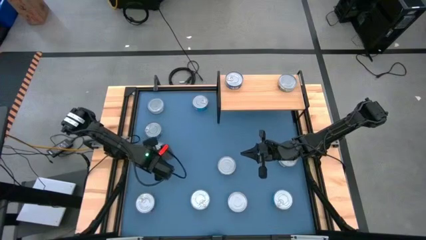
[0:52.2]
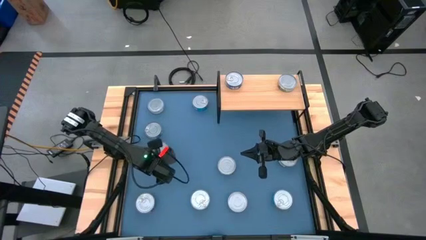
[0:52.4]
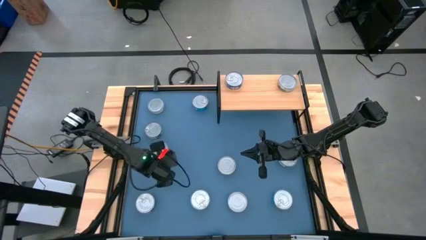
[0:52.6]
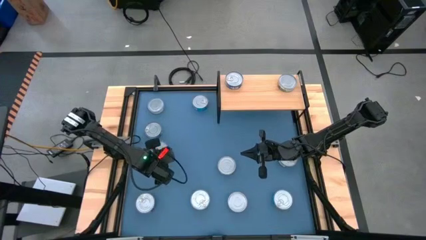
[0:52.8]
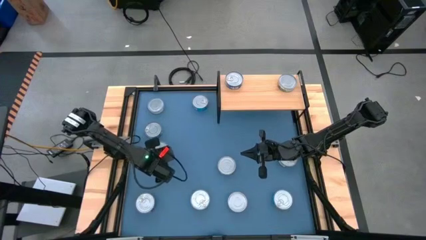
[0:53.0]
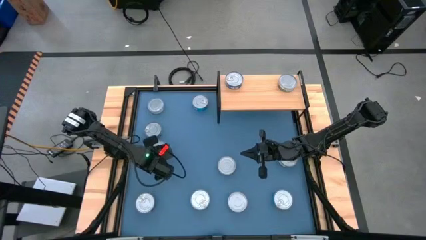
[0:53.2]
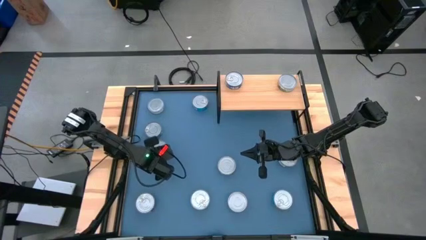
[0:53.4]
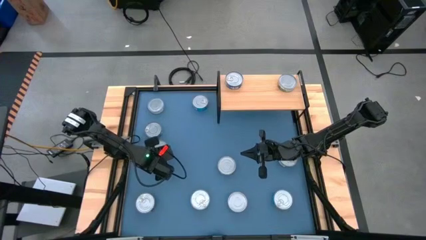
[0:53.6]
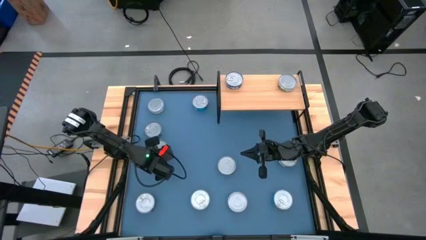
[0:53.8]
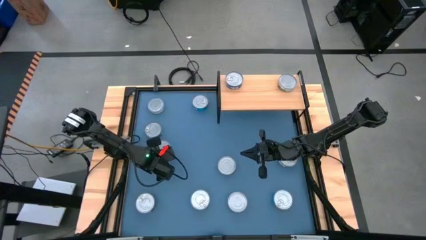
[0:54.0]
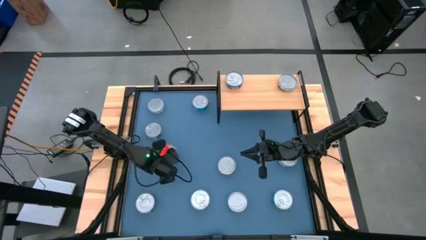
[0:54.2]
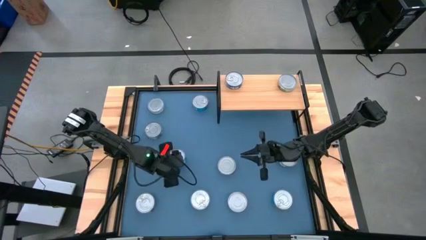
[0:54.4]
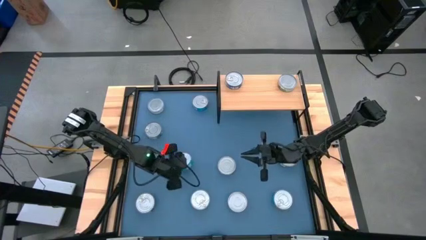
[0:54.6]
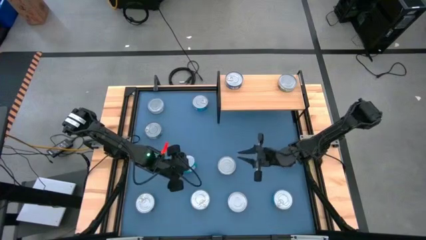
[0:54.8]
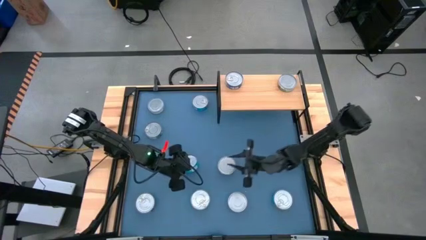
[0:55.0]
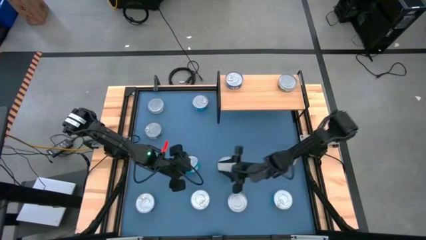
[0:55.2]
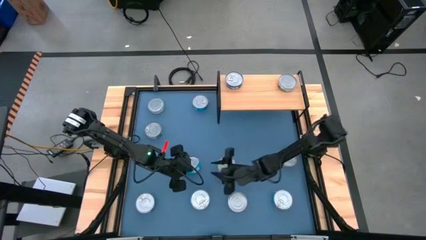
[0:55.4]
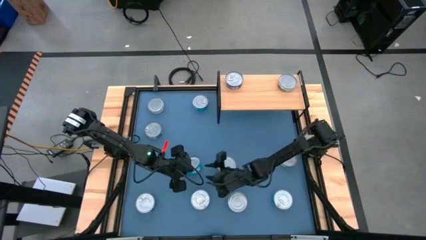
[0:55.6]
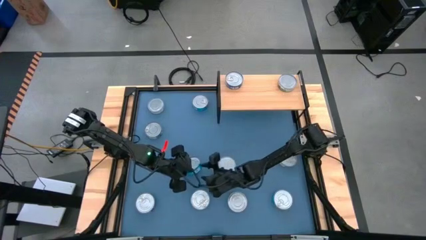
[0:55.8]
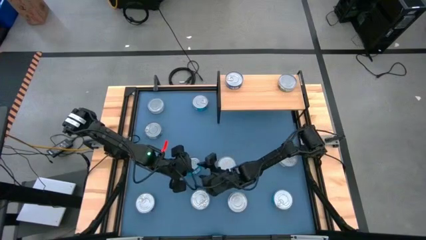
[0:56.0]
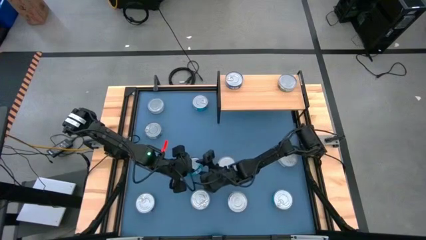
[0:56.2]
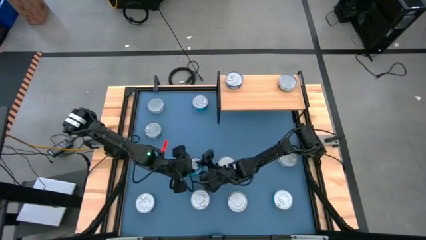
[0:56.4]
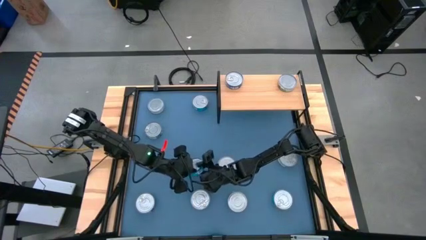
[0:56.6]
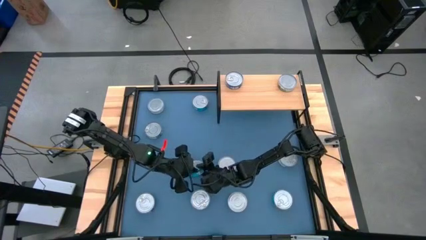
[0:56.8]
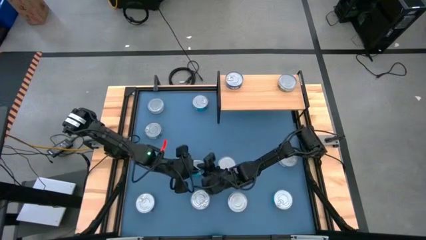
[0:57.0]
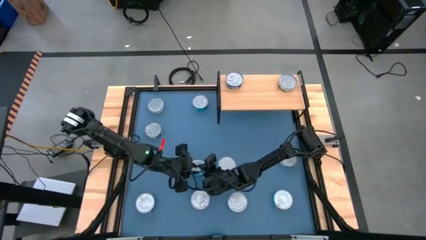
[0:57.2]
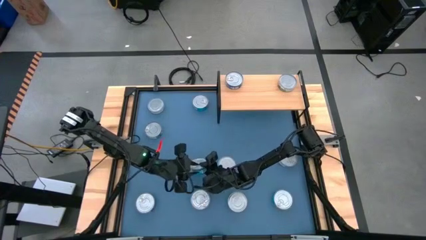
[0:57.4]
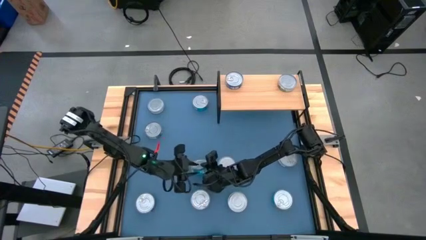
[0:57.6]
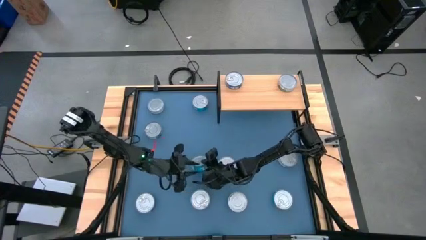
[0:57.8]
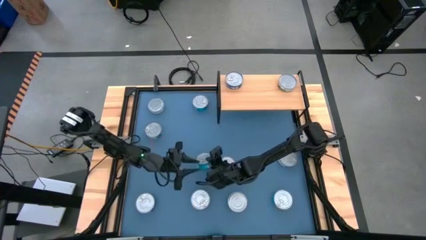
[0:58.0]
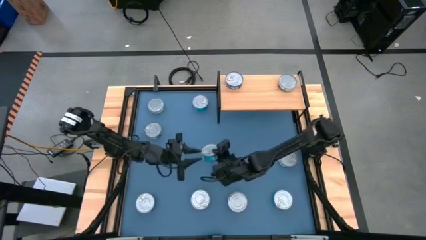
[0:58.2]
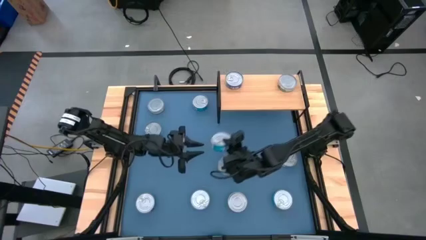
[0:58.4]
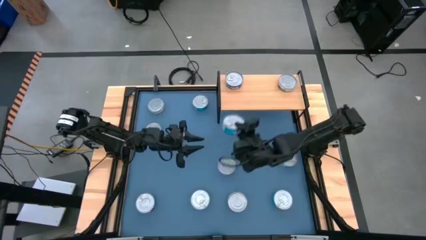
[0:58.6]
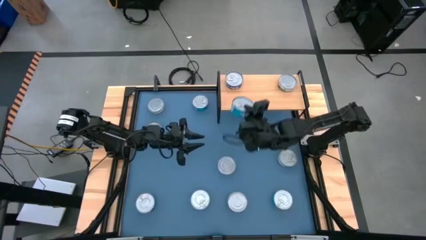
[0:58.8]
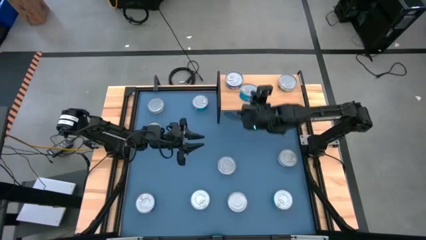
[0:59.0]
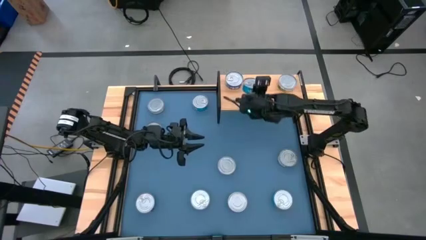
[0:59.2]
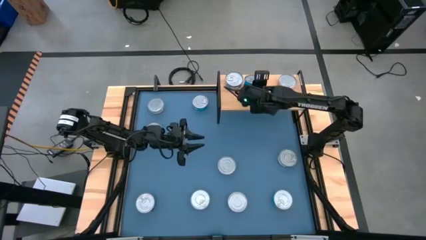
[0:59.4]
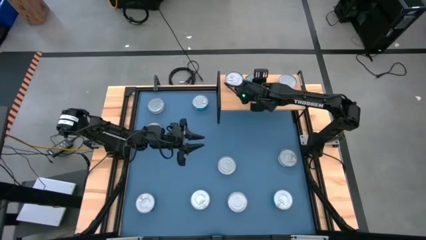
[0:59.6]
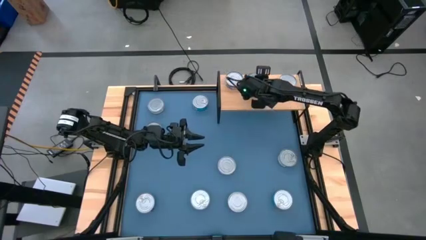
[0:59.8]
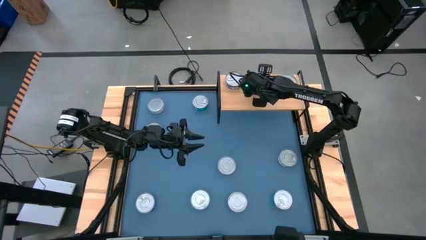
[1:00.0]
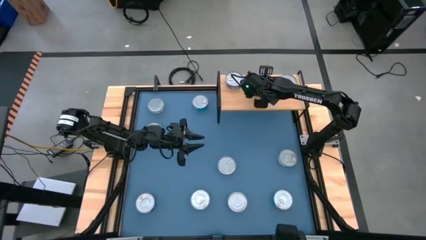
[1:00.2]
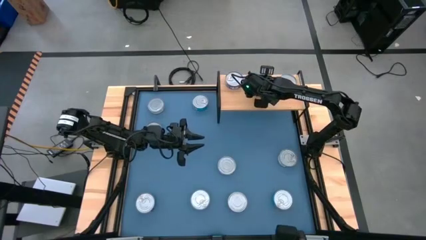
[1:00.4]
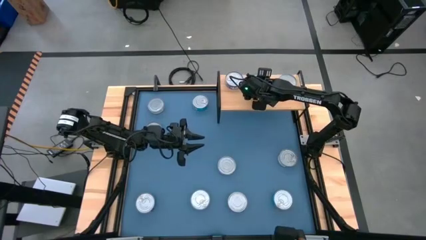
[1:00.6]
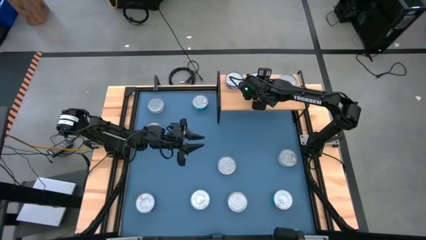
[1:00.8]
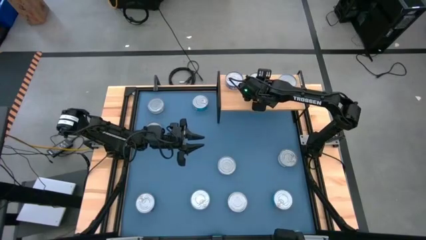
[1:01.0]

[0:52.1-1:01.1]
Task: Stack canned seafood by type on shelf
Put the center left light blue tuna can on the shelf

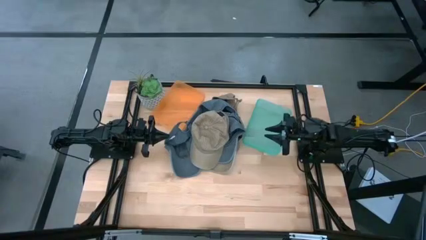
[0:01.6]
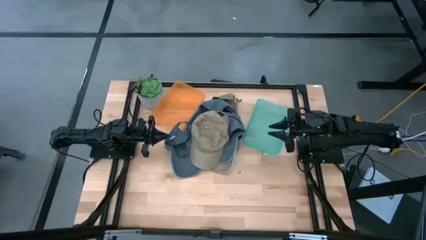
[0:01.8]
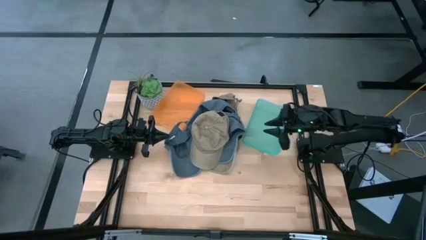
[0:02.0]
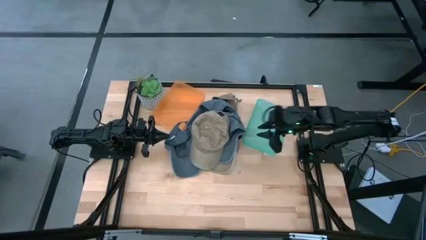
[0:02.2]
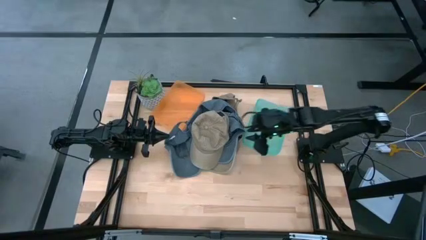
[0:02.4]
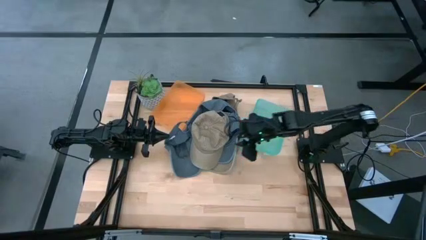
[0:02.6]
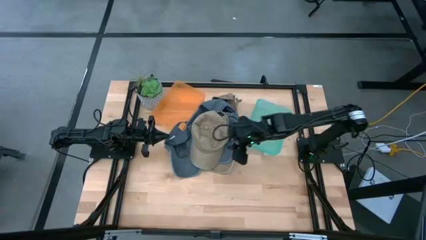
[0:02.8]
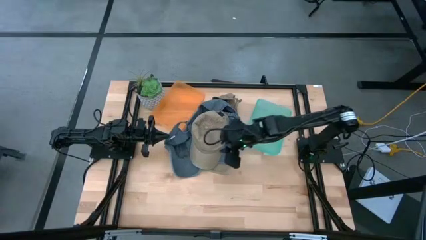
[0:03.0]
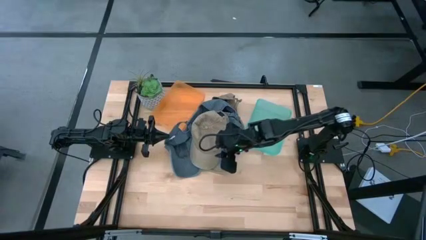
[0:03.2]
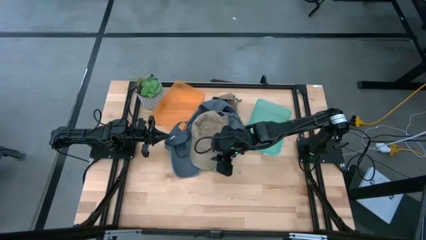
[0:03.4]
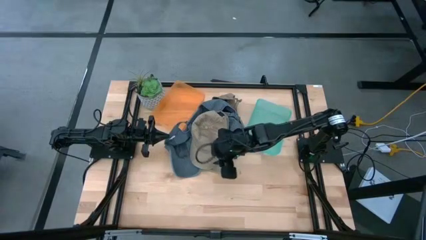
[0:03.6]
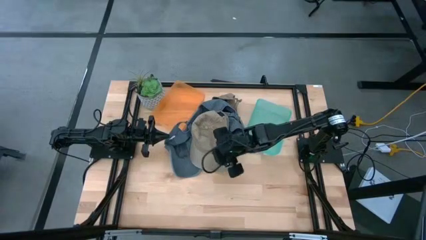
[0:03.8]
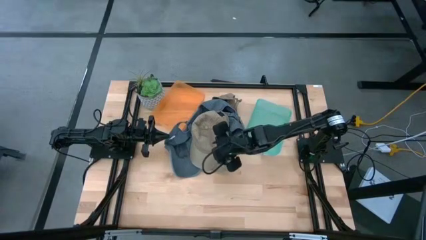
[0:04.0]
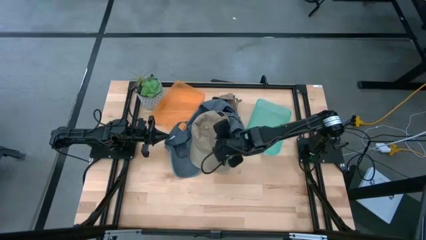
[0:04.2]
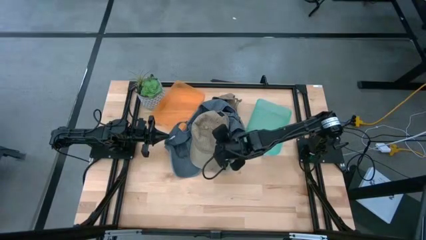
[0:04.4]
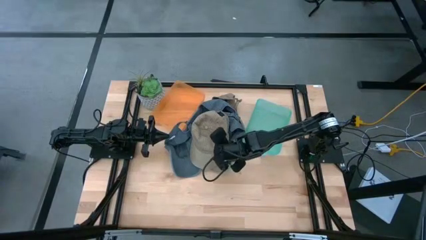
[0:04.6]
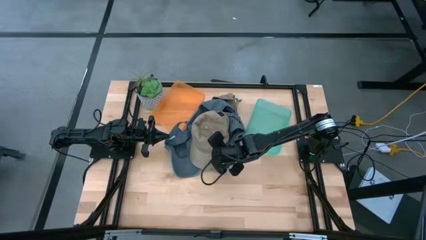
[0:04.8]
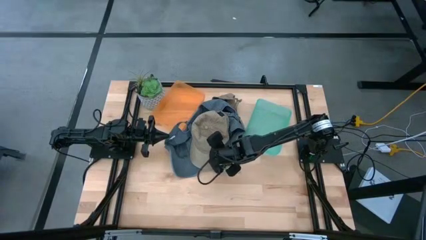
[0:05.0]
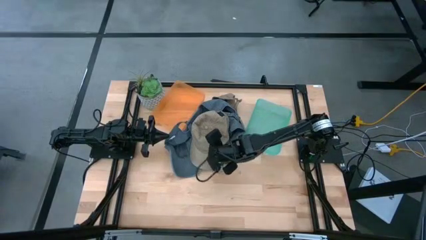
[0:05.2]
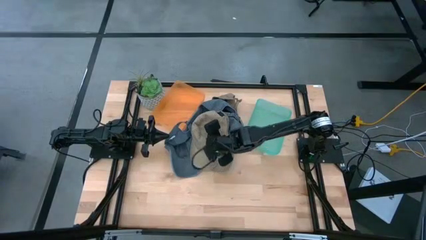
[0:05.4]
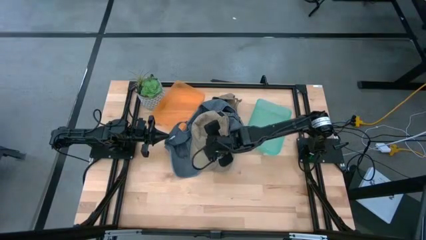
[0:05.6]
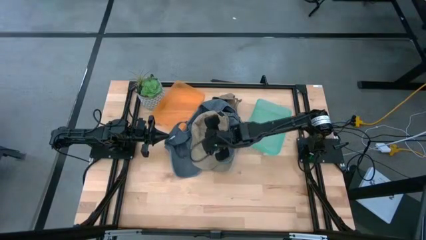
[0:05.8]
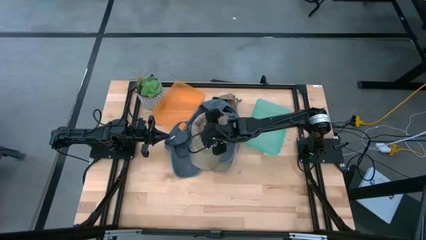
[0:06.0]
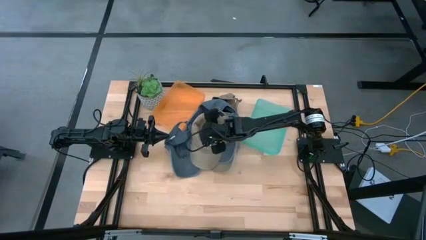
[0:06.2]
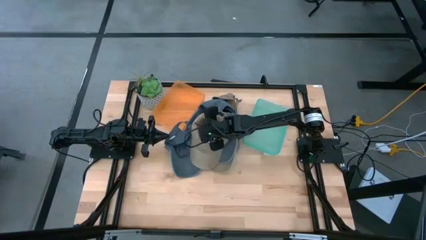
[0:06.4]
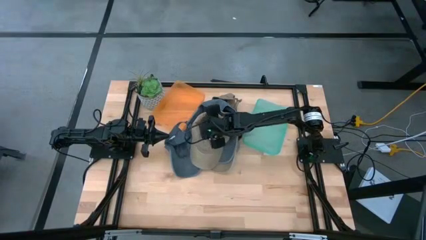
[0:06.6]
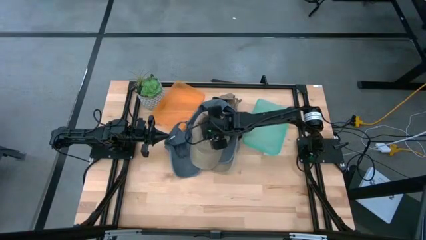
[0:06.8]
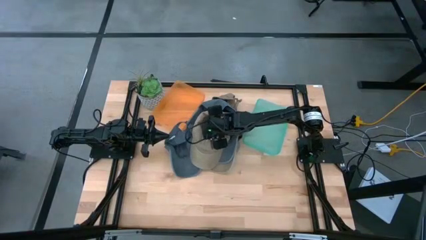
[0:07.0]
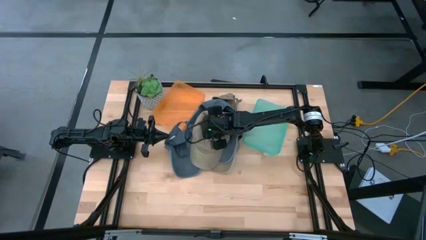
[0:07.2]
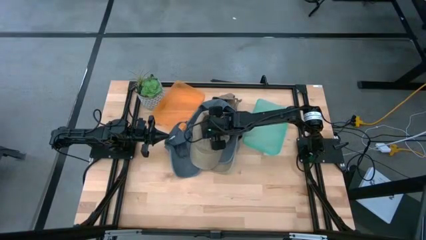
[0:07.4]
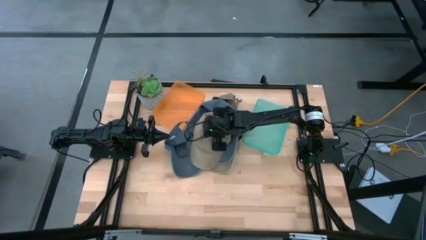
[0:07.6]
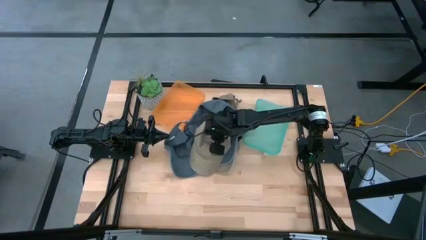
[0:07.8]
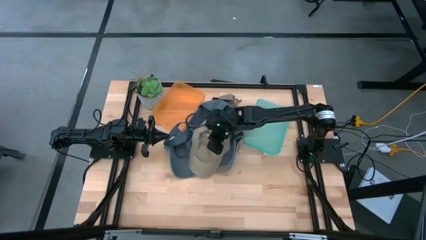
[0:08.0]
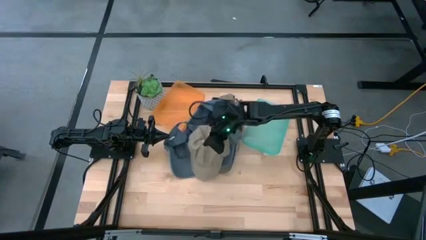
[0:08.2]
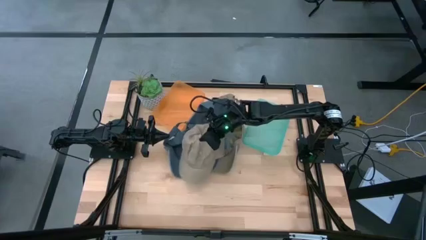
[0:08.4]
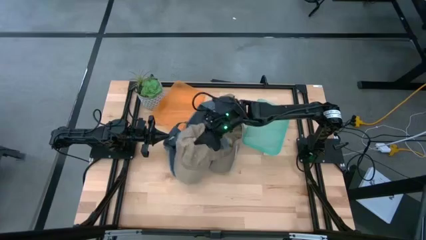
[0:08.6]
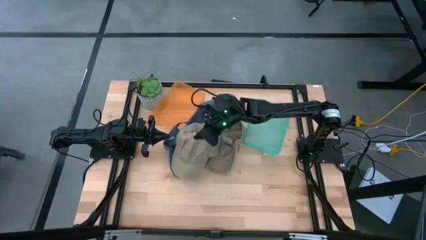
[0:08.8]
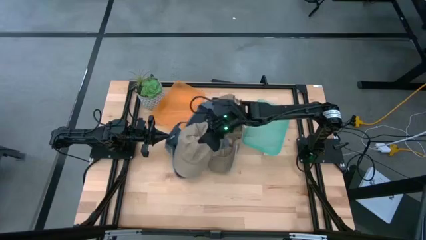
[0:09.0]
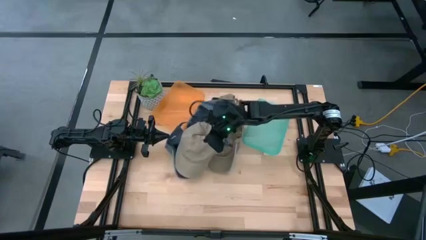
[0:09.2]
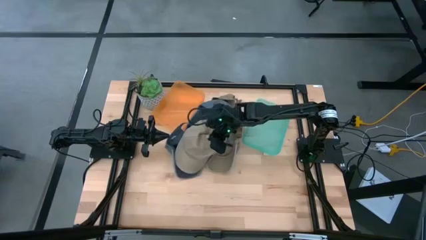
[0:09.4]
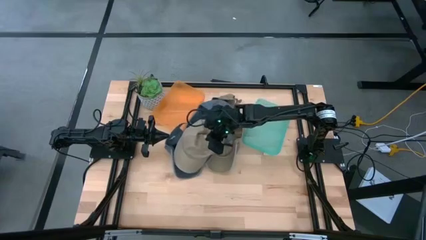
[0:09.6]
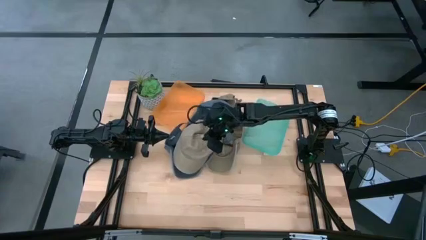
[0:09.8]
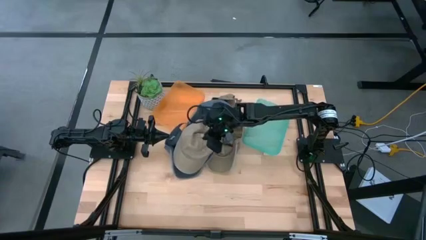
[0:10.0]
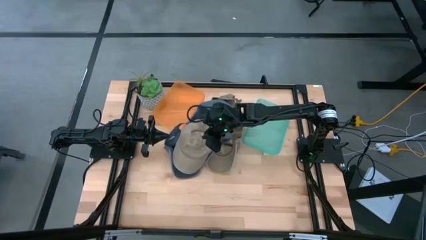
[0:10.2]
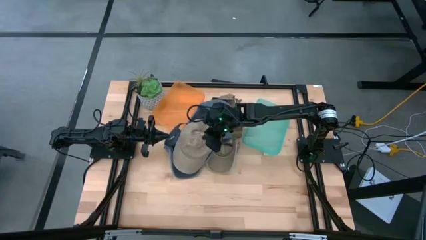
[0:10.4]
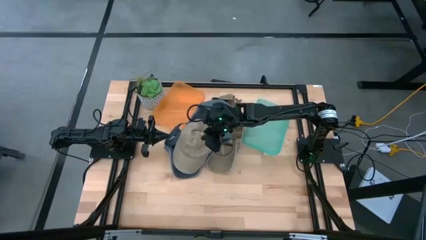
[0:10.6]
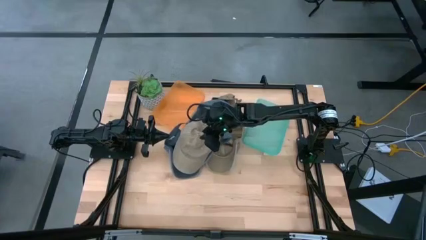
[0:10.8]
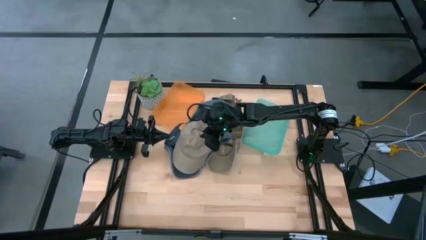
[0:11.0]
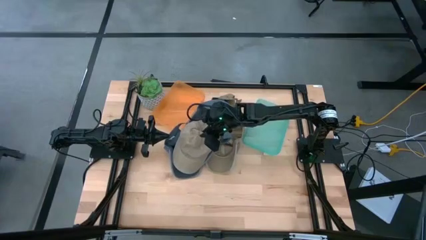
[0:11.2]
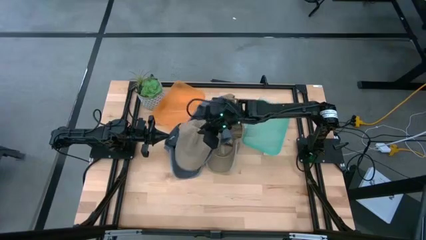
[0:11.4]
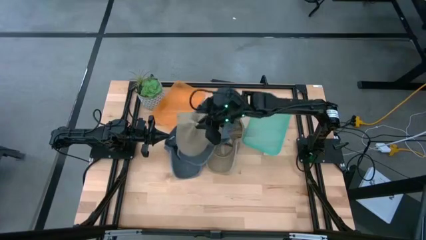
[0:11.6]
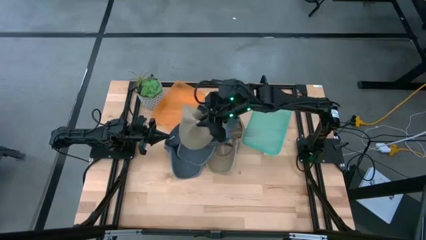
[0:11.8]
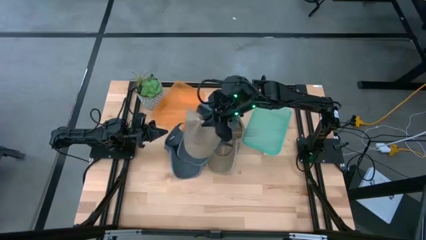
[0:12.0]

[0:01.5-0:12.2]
Task: Pick & Place hat
Put the brown cap into the blue bin
